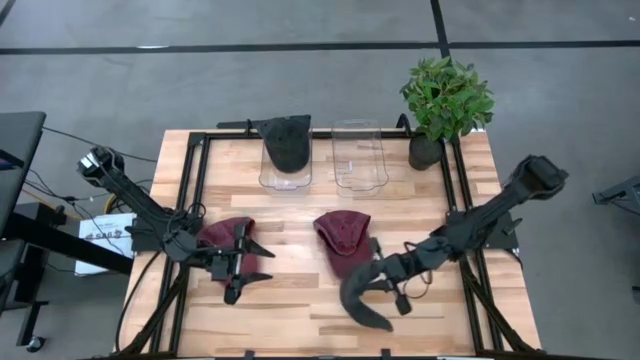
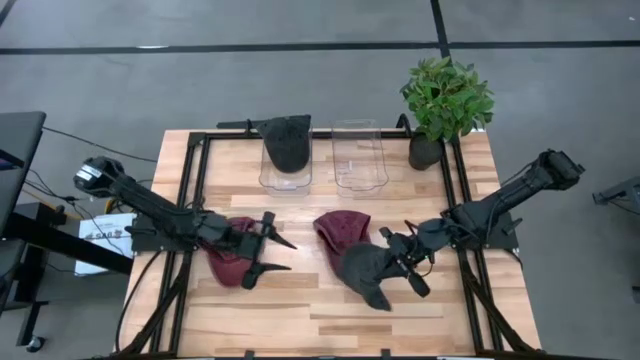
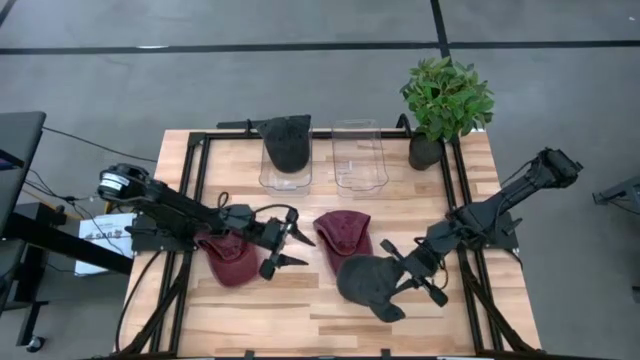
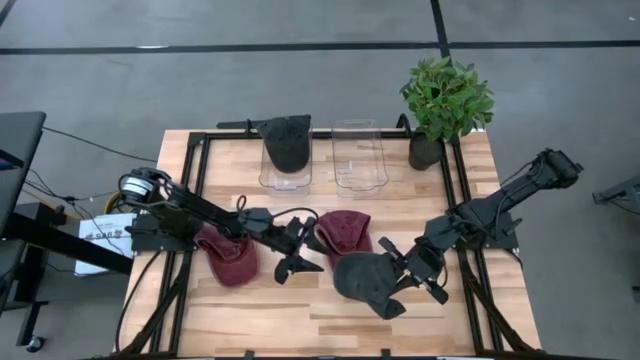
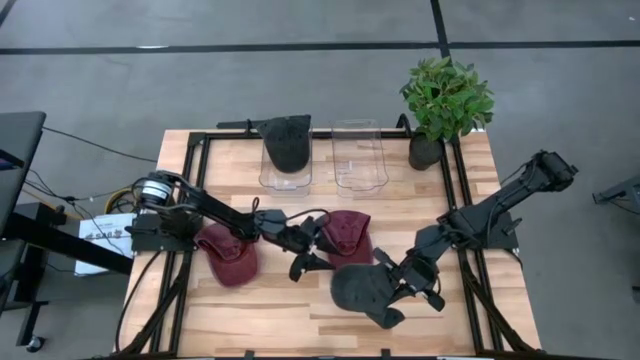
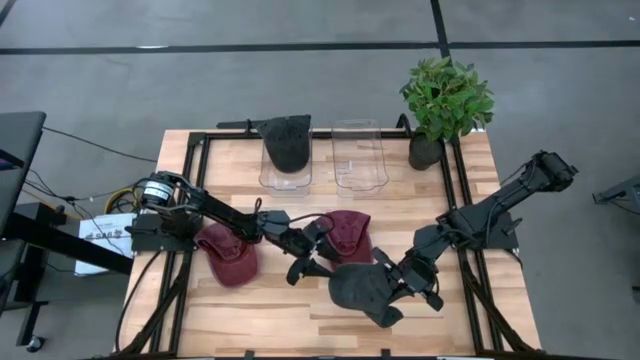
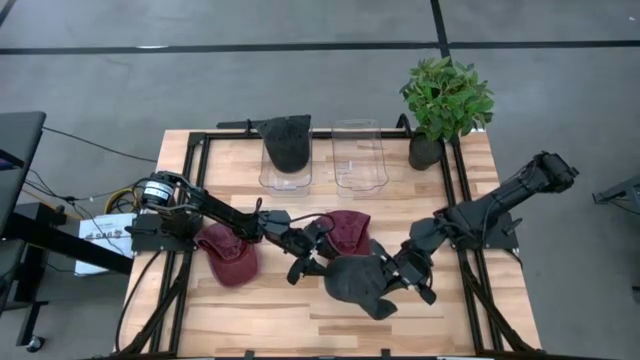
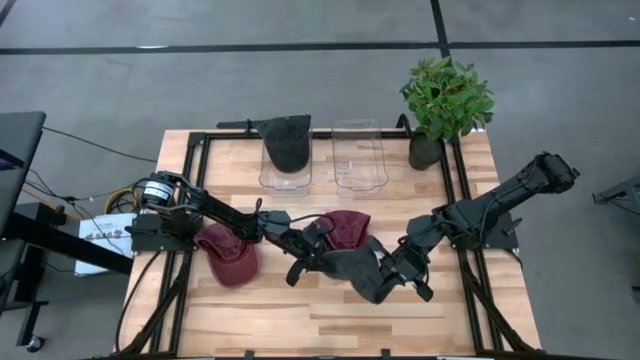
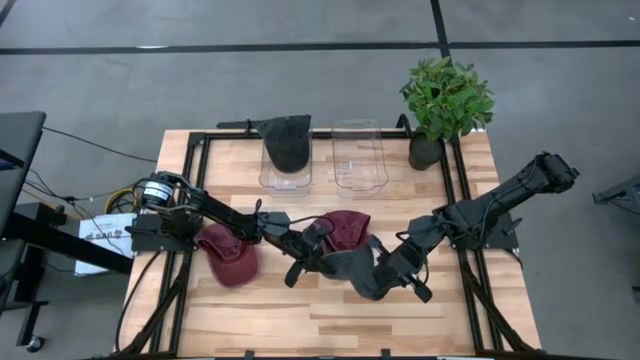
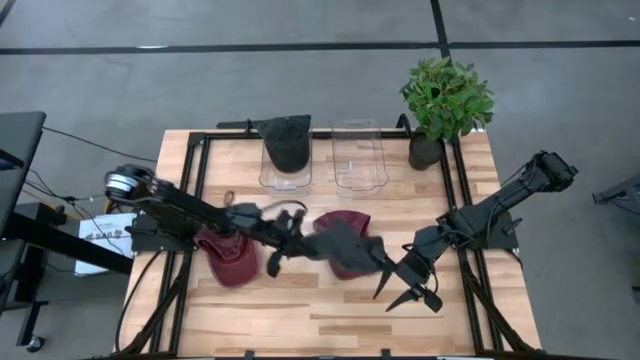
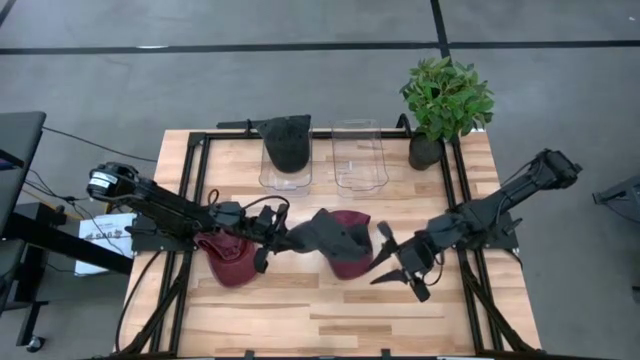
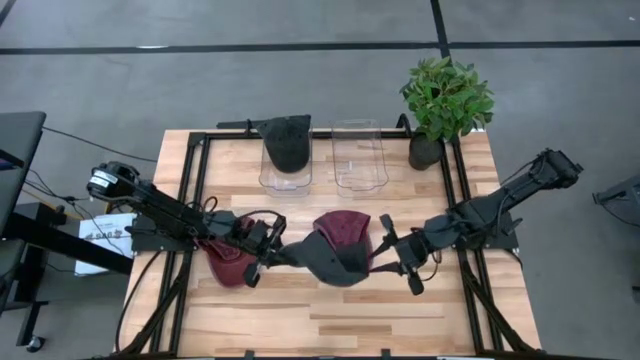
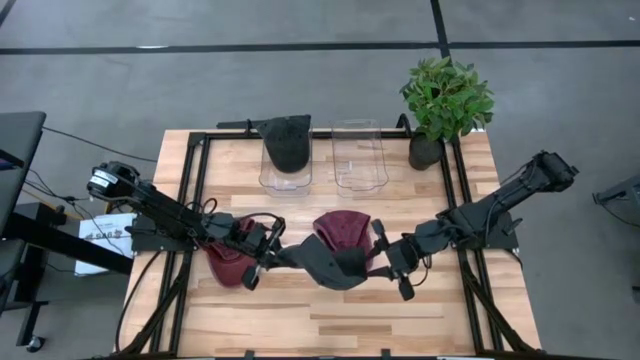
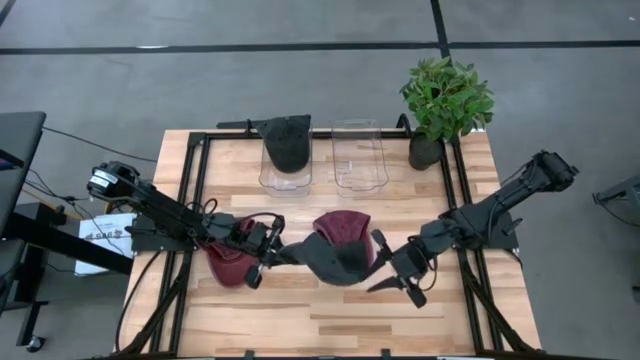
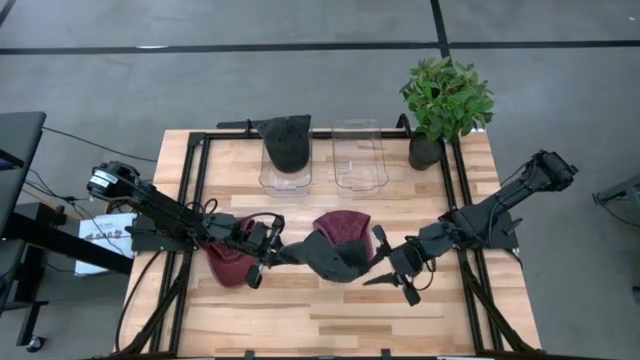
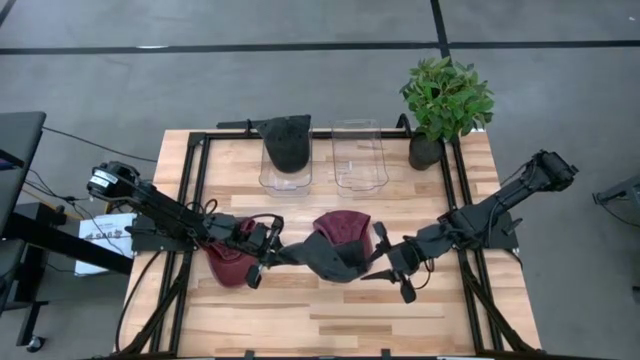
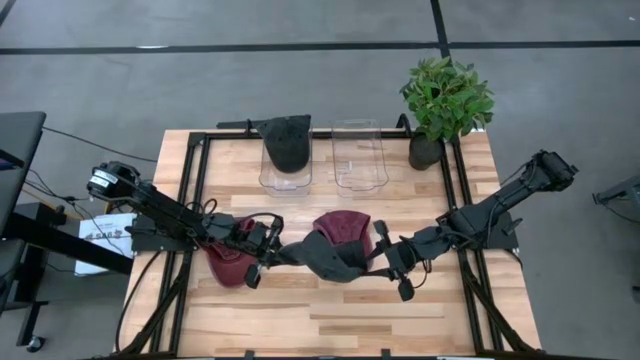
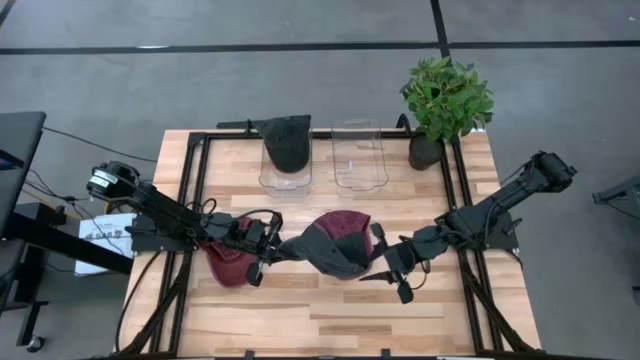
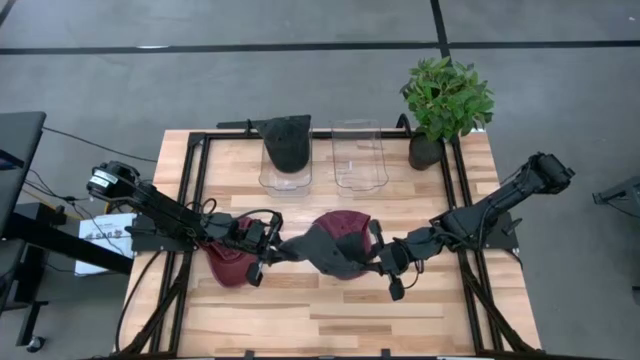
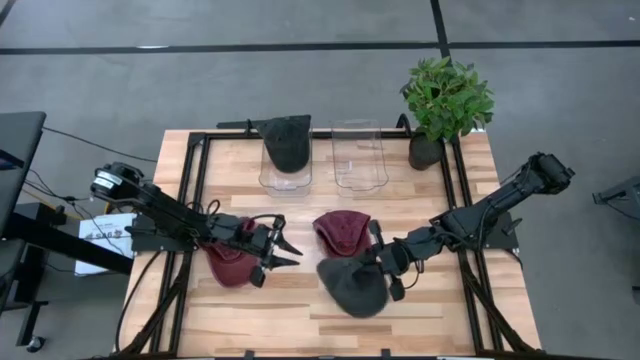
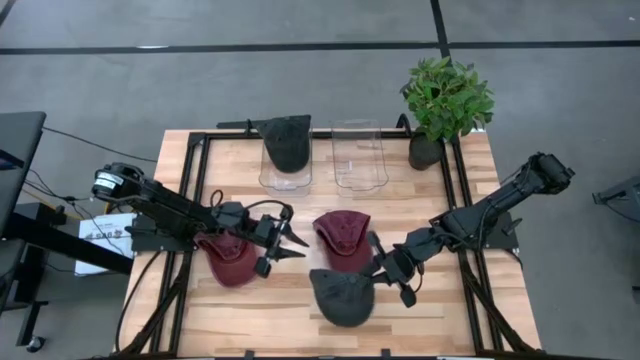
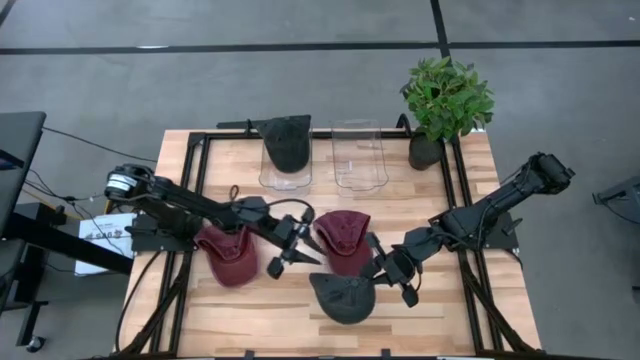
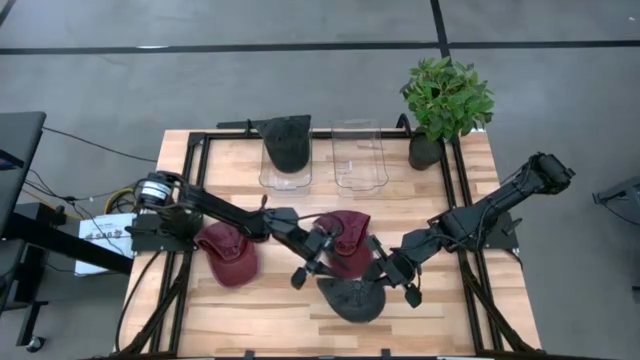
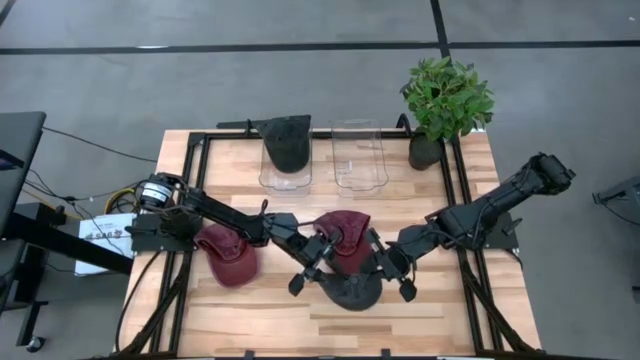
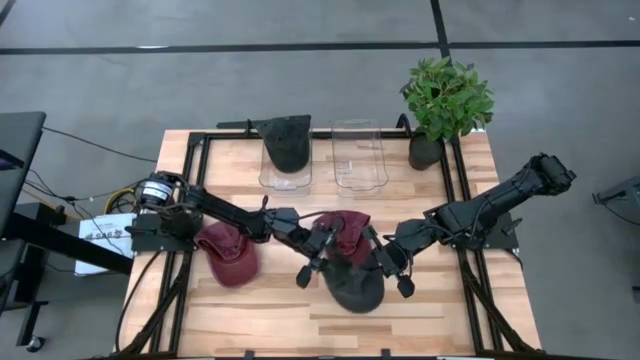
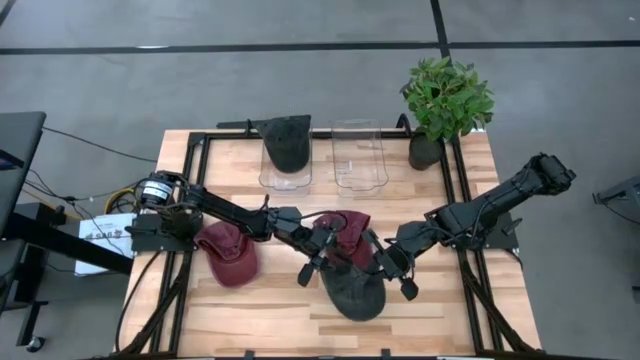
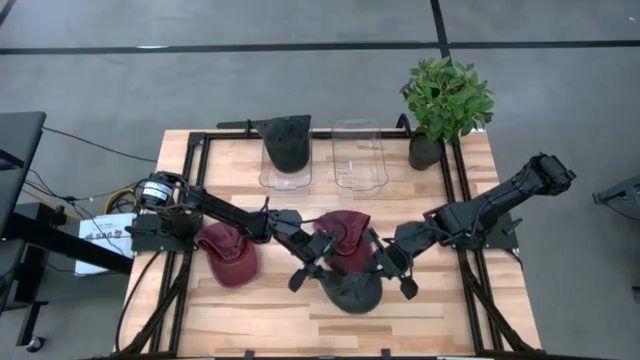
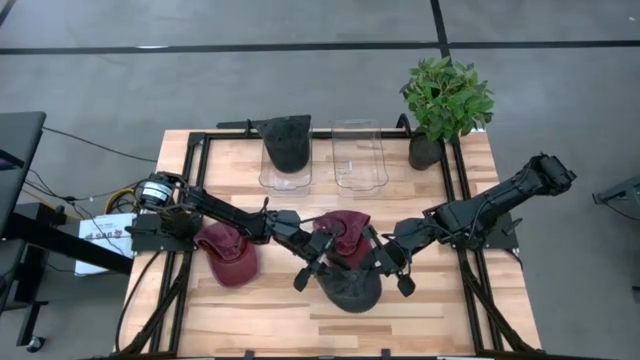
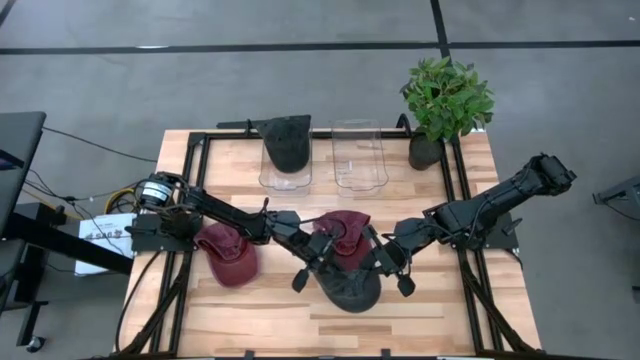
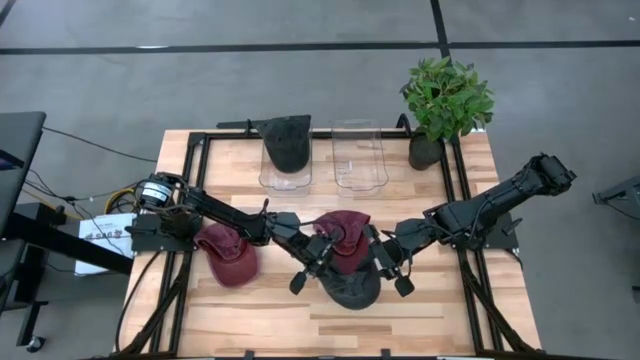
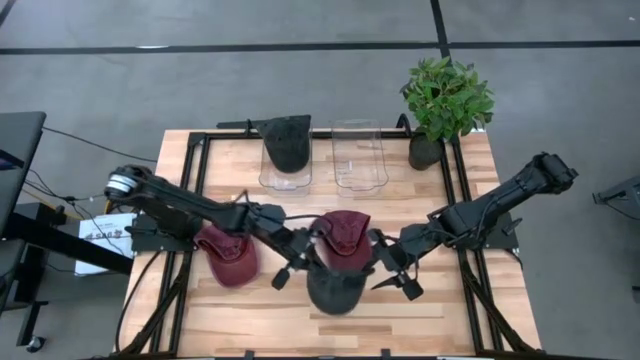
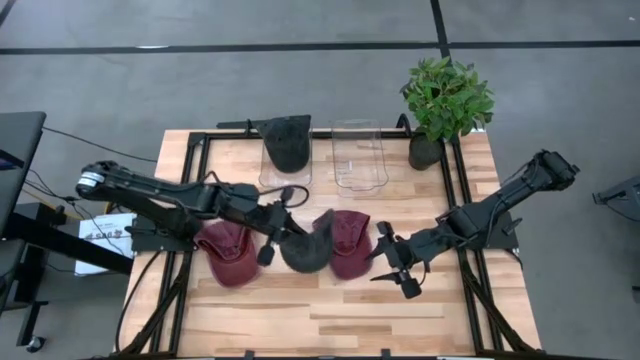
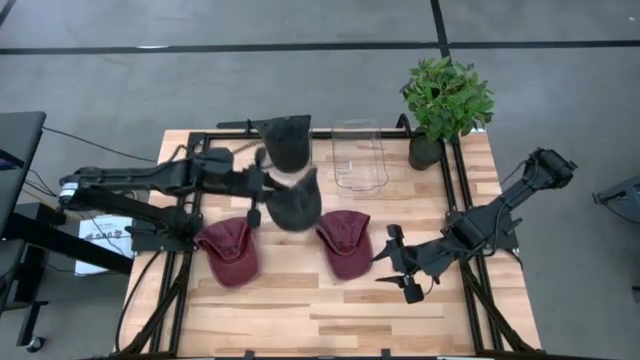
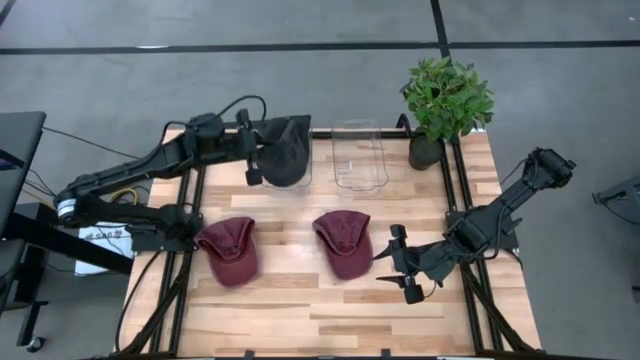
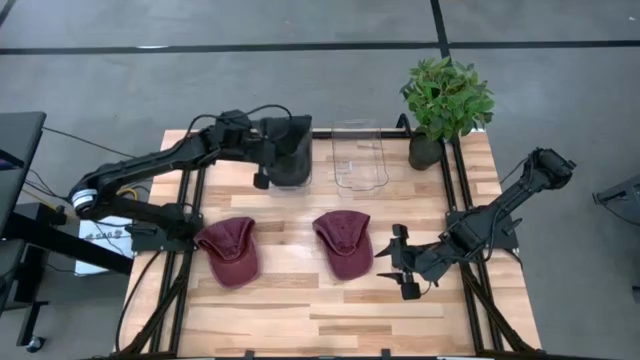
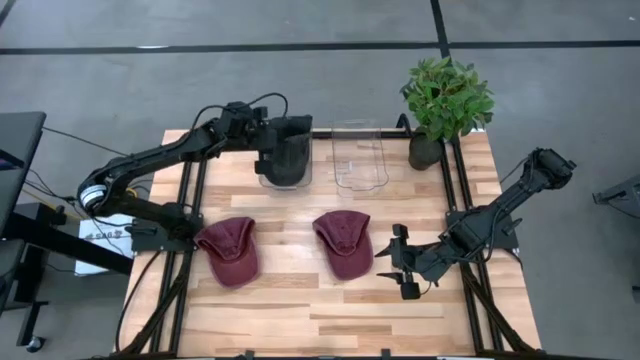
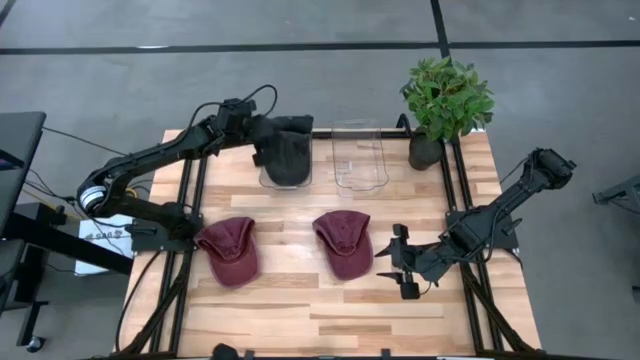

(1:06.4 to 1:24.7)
Task: Pick & Place hat
Put the black cap into the left transparent bin

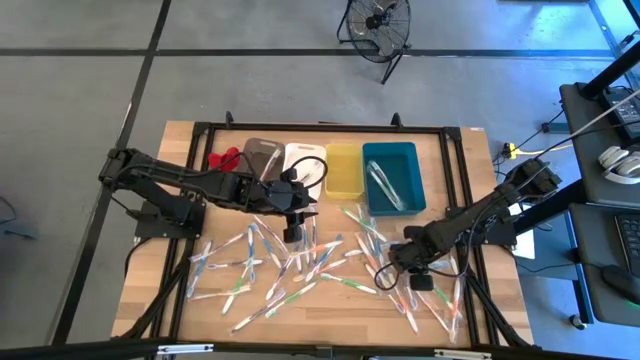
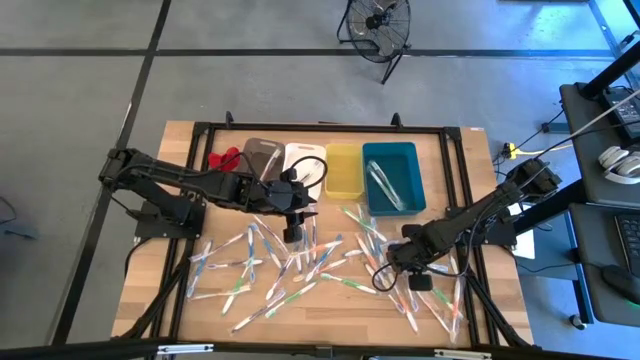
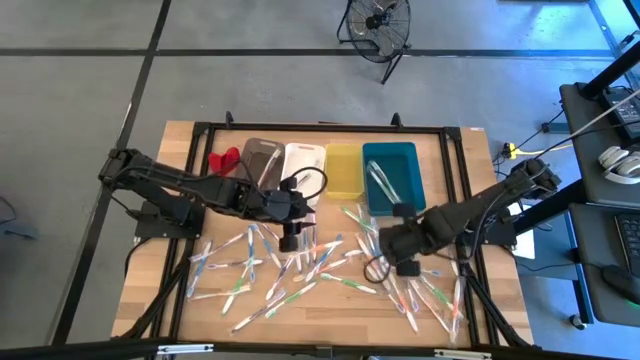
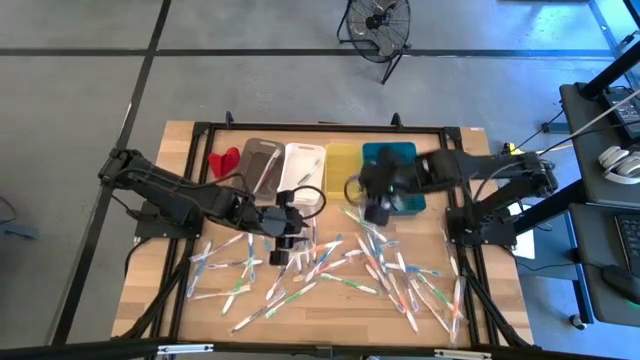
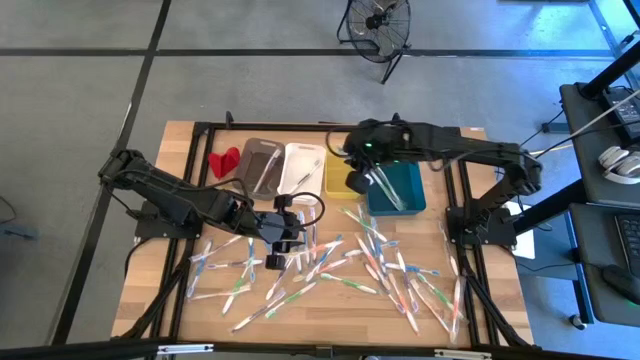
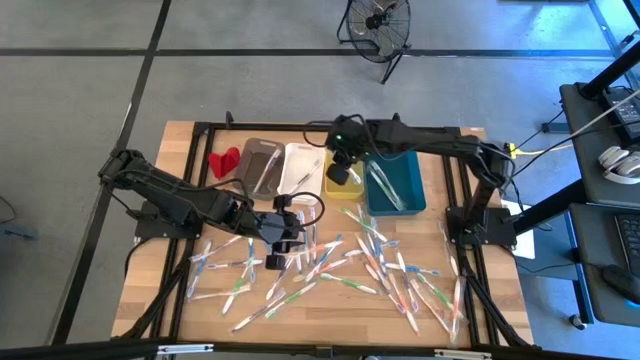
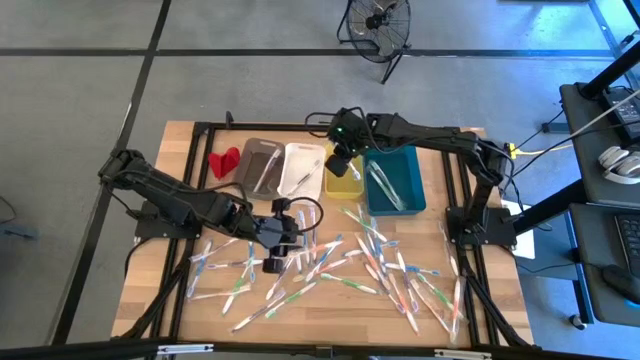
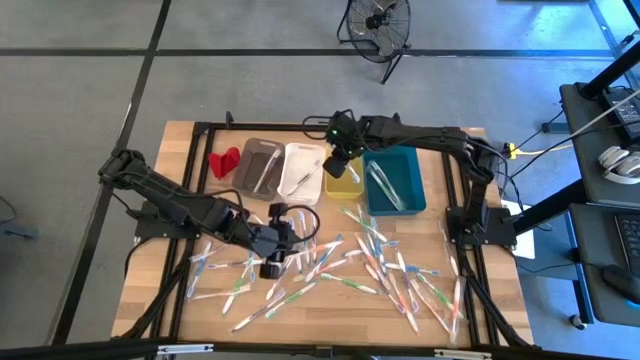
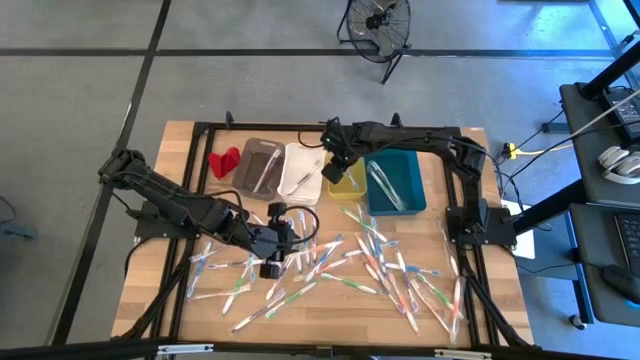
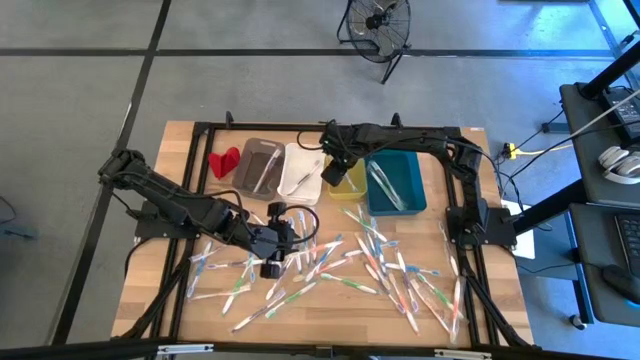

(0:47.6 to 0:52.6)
Task: Pick & Place Toothbrushes
Put the blue toothbrush into the yellow bin
